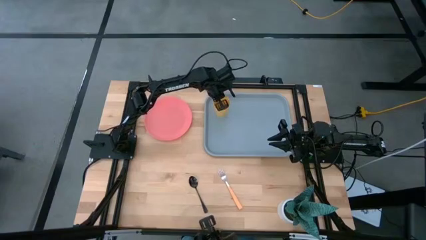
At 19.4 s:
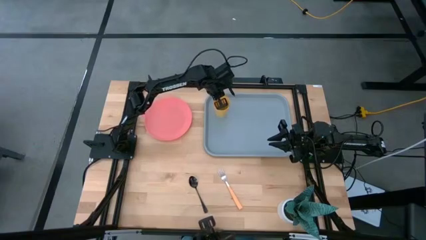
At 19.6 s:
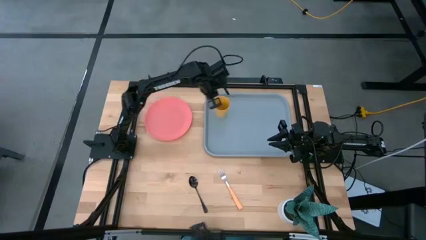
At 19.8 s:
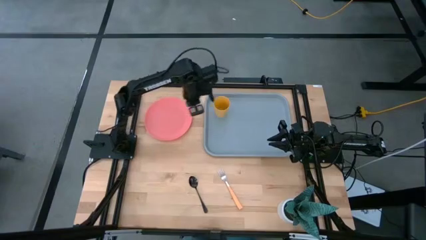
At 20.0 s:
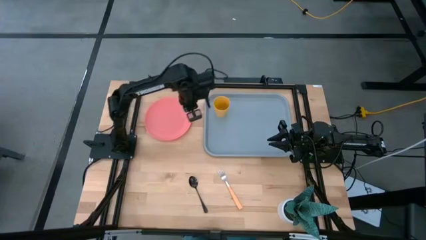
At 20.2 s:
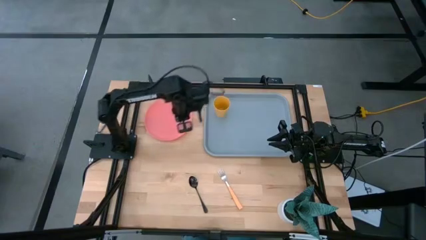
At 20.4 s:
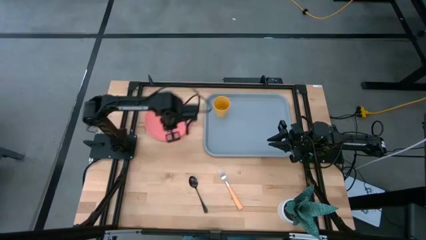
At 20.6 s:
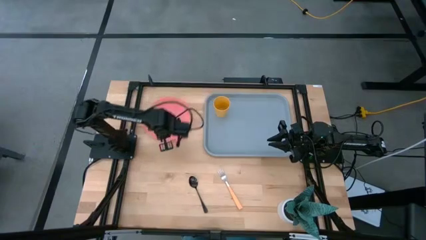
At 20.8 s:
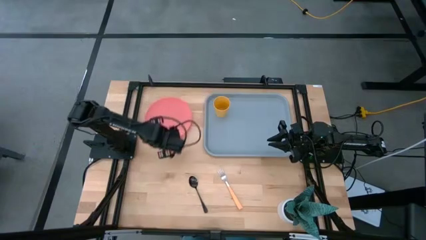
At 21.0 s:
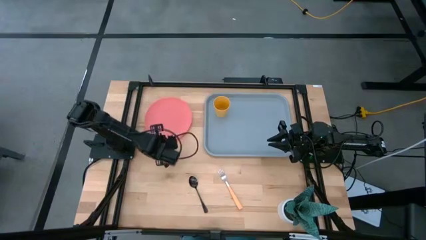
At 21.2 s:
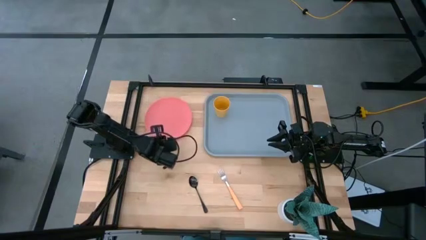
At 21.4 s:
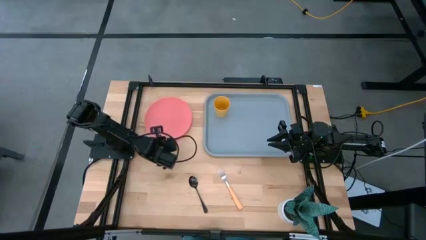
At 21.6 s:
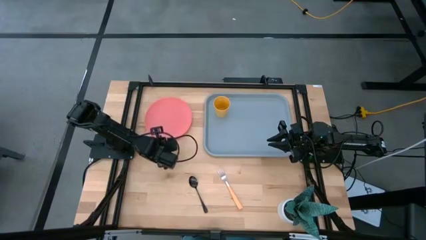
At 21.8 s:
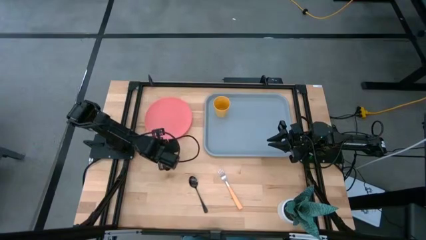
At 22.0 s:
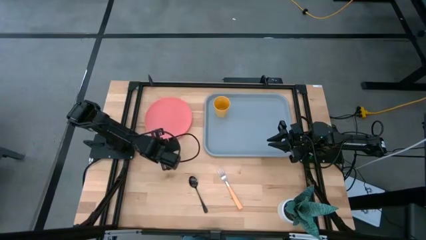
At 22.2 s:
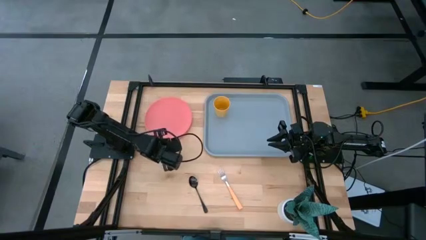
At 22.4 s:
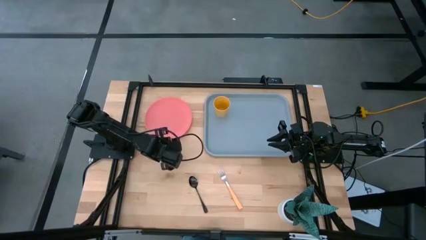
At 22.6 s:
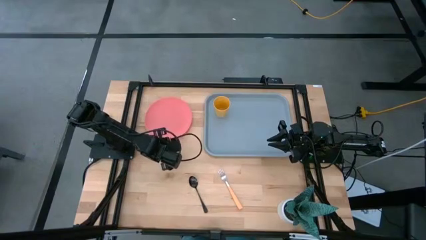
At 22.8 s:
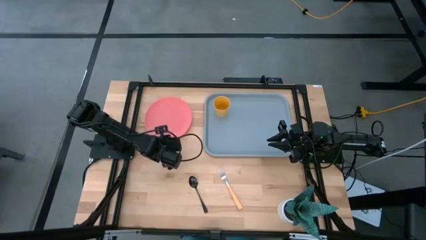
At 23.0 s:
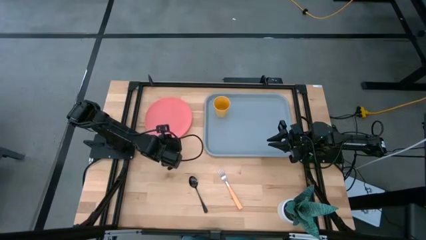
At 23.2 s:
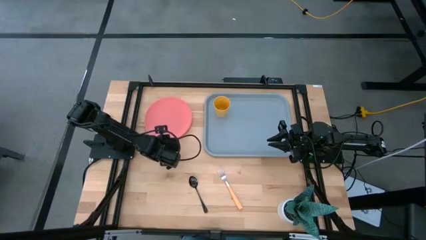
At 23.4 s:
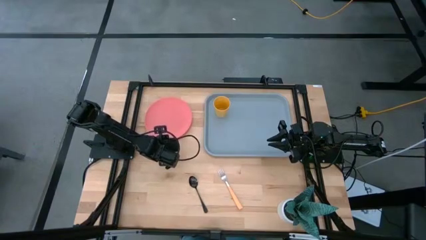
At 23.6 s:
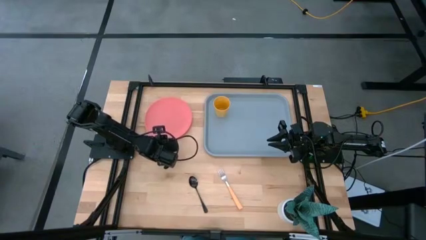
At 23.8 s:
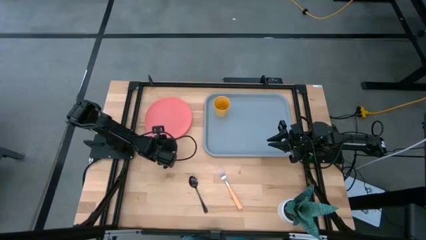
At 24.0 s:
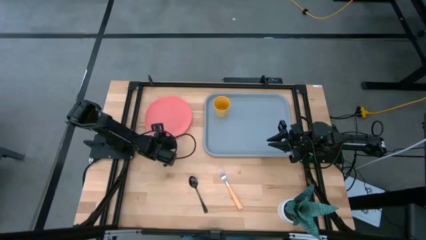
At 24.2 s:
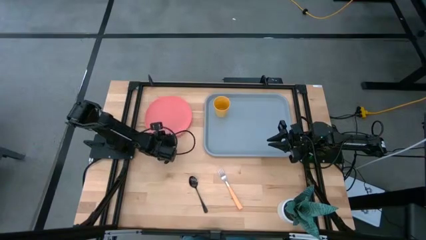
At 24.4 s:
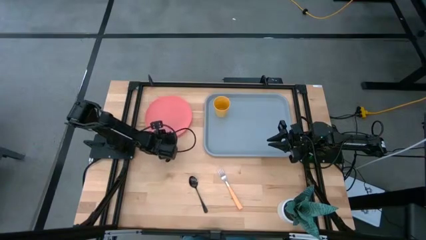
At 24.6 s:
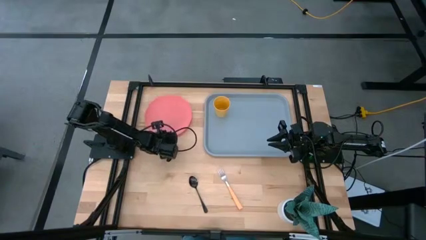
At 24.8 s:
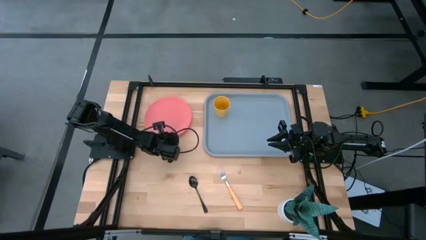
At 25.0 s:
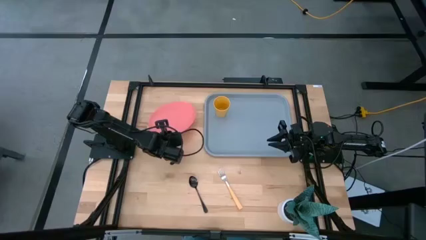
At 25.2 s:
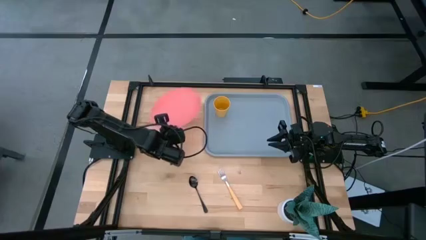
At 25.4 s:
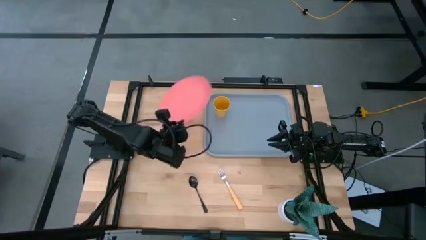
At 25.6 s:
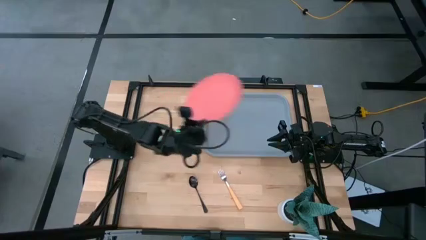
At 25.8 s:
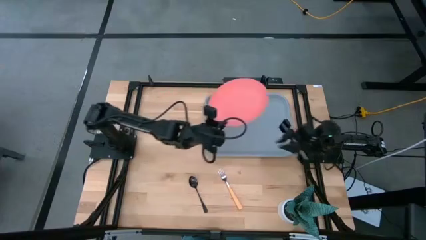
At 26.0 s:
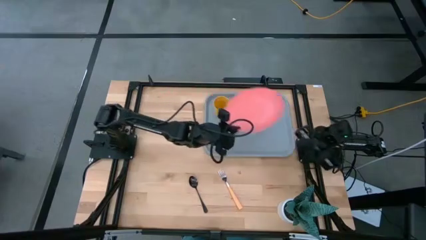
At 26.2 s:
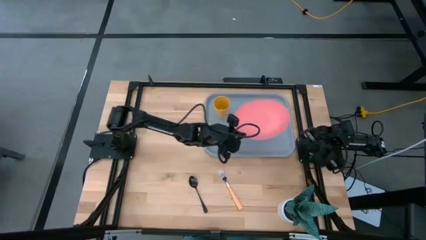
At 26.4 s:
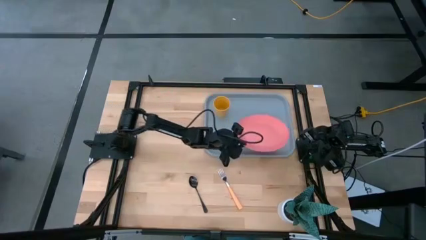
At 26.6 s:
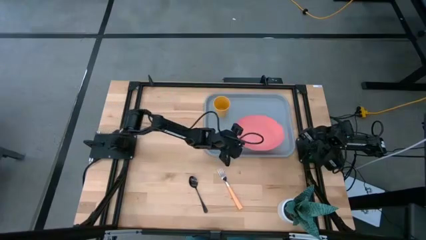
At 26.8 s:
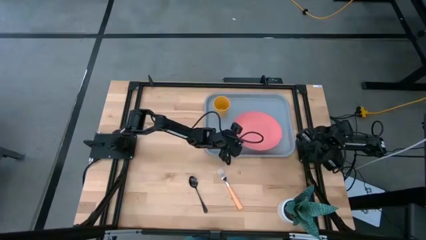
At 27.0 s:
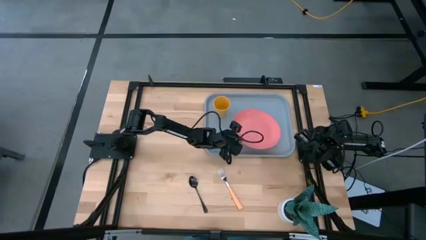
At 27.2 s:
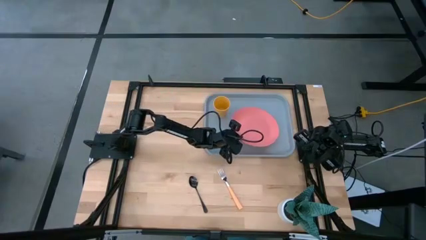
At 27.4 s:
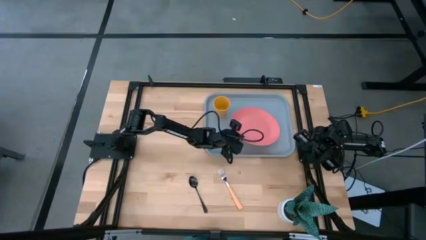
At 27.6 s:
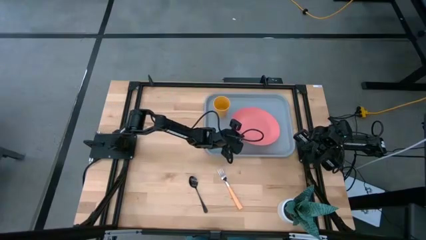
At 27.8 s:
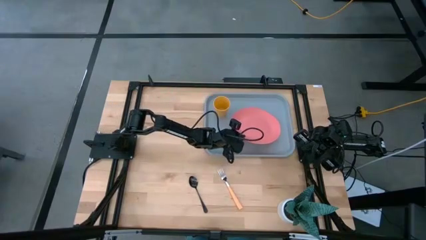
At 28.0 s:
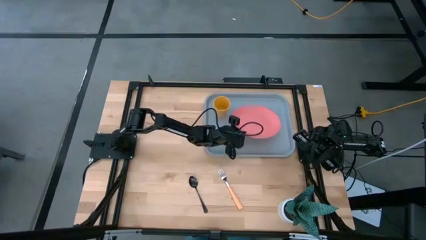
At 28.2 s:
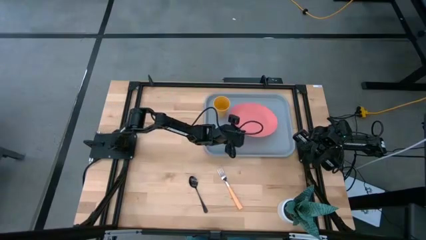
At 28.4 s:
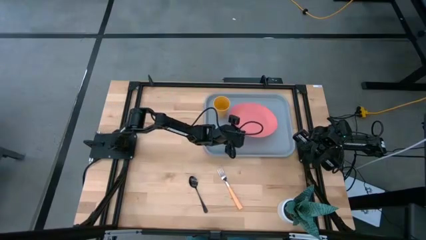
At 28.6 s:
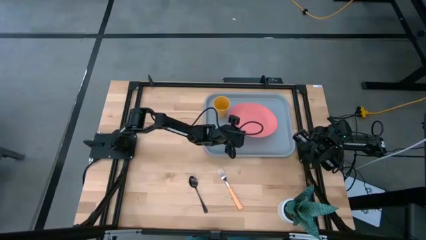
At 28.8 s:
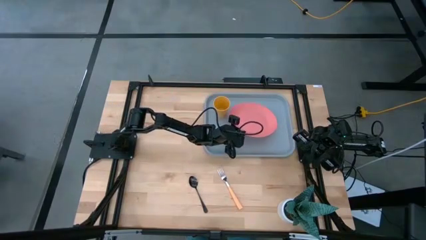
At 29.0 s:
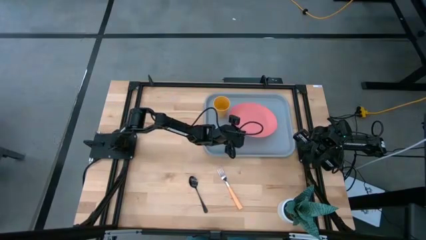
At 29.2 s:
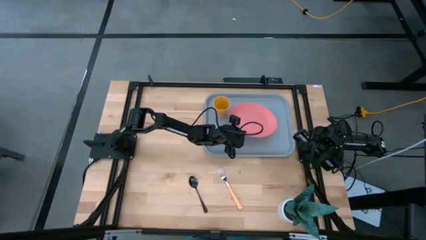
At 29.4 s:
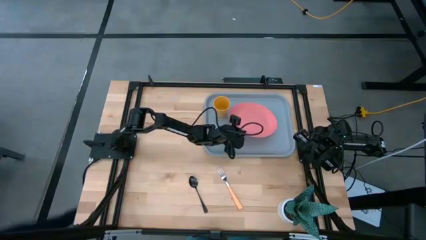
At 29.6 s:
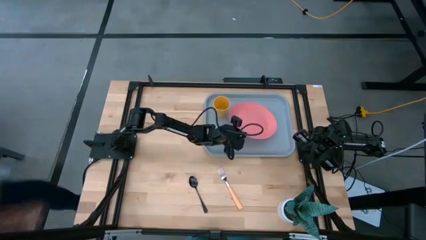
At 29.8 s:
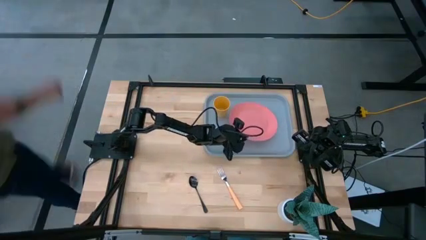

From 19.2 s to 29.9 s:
Task: Pick and place plate/cup/fork/spoon on tray
Put the pink plate on the gray tray to the right of the yellow cup

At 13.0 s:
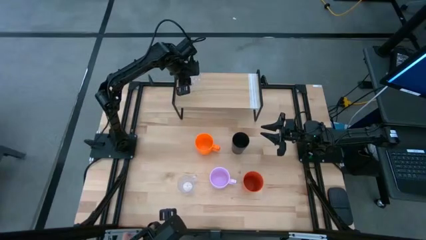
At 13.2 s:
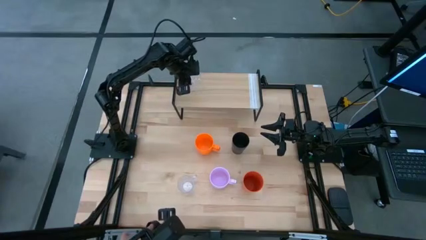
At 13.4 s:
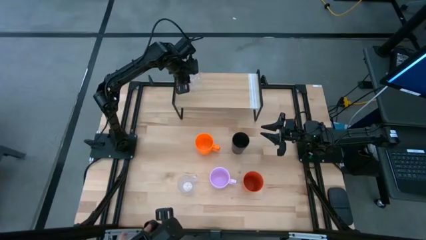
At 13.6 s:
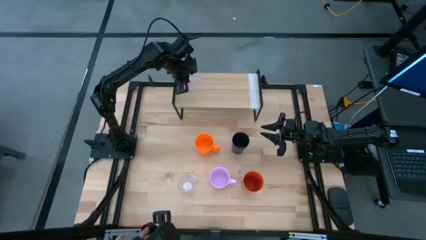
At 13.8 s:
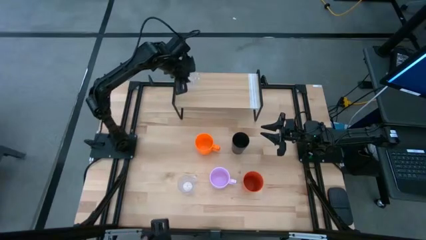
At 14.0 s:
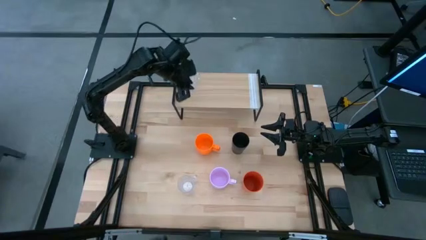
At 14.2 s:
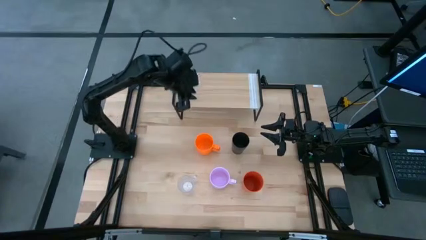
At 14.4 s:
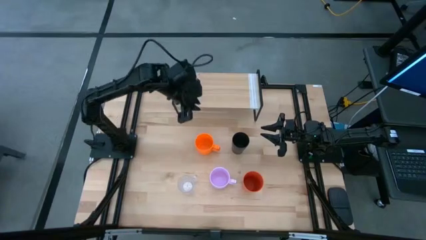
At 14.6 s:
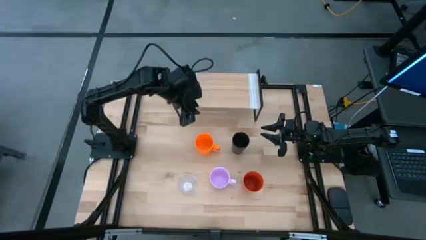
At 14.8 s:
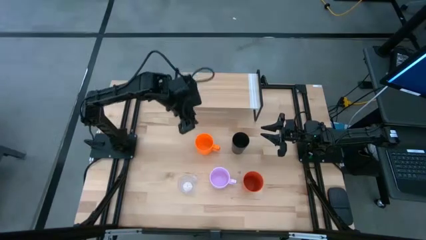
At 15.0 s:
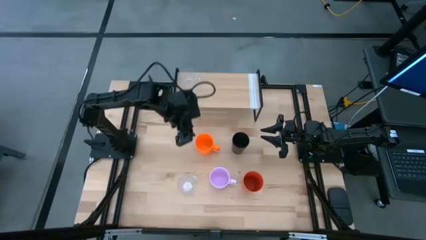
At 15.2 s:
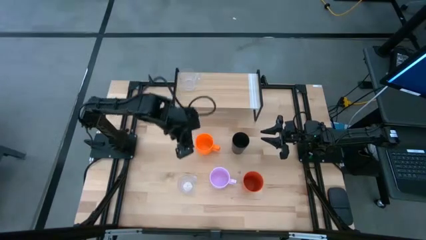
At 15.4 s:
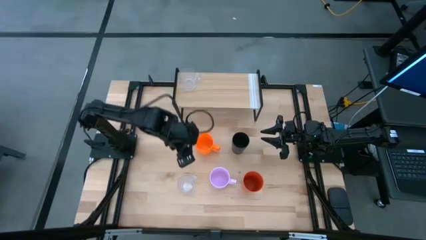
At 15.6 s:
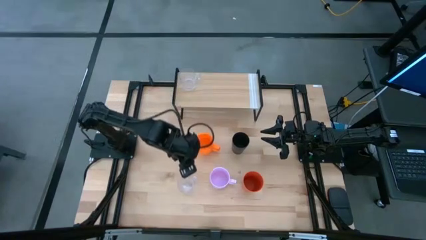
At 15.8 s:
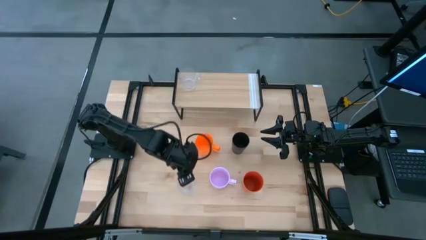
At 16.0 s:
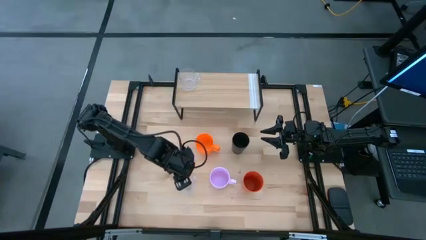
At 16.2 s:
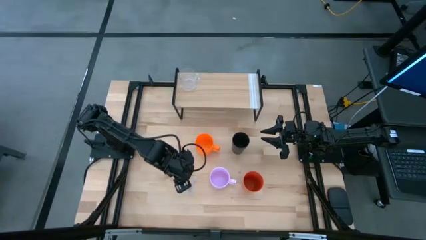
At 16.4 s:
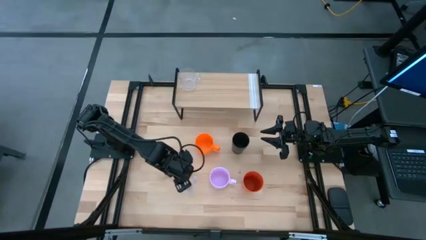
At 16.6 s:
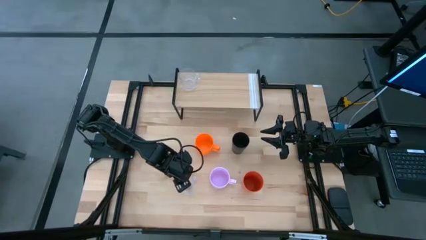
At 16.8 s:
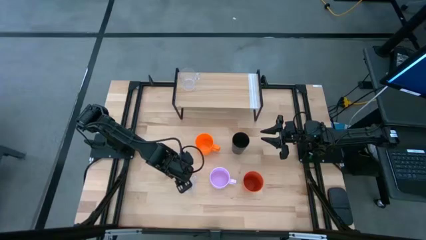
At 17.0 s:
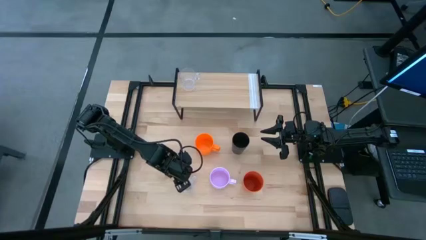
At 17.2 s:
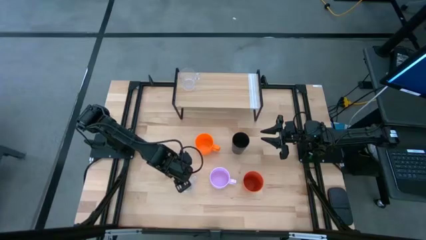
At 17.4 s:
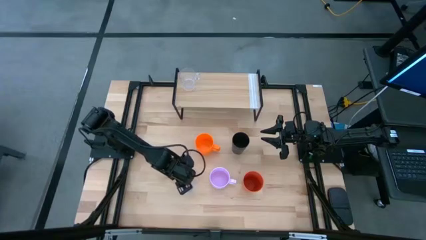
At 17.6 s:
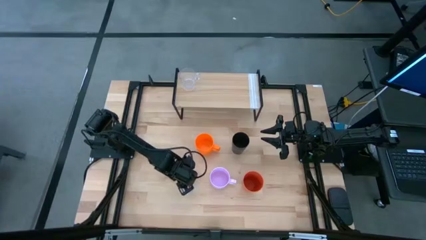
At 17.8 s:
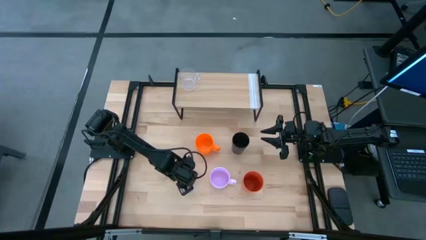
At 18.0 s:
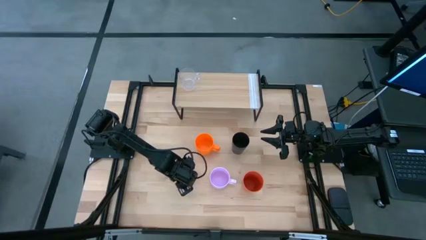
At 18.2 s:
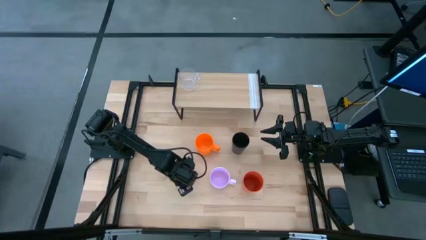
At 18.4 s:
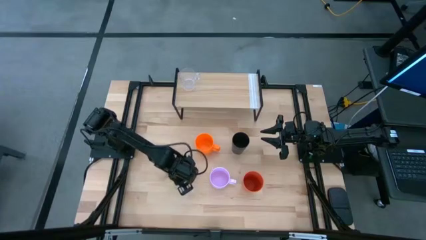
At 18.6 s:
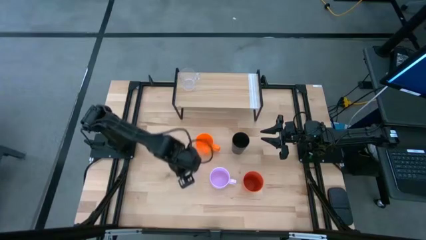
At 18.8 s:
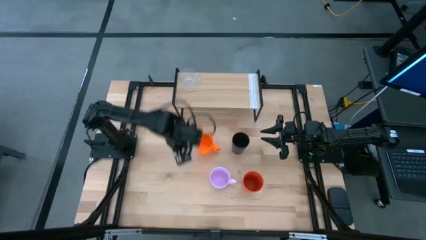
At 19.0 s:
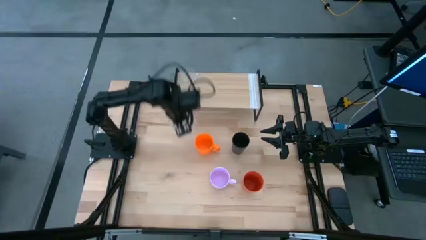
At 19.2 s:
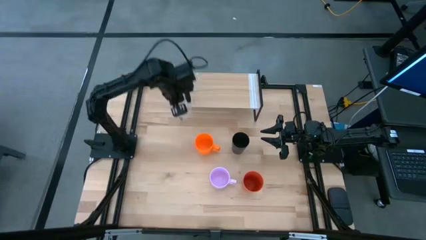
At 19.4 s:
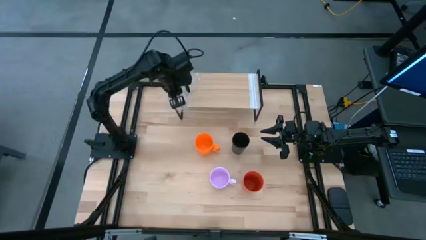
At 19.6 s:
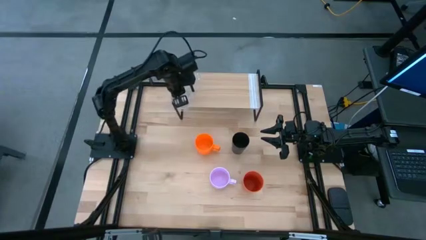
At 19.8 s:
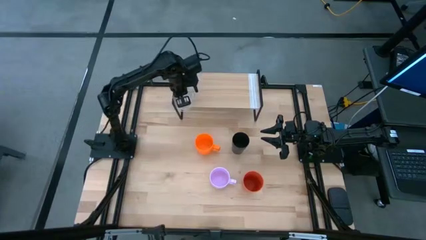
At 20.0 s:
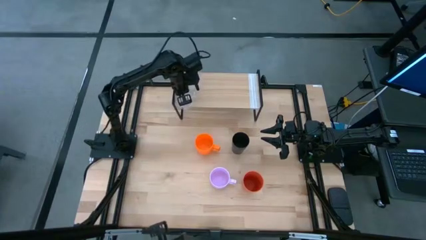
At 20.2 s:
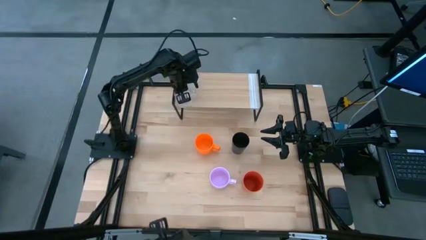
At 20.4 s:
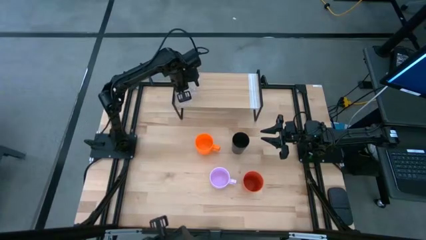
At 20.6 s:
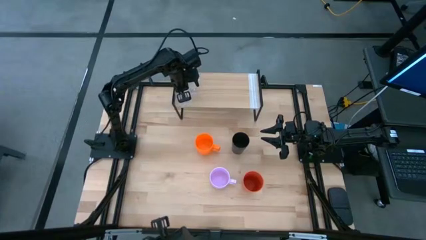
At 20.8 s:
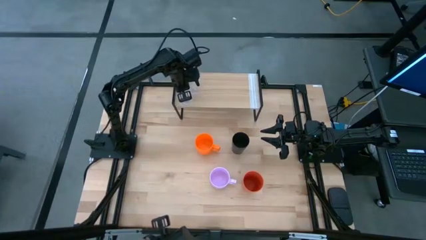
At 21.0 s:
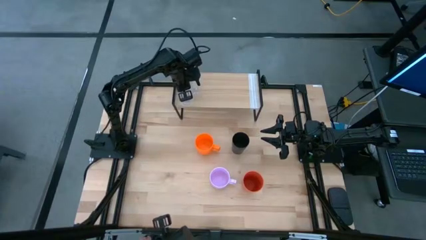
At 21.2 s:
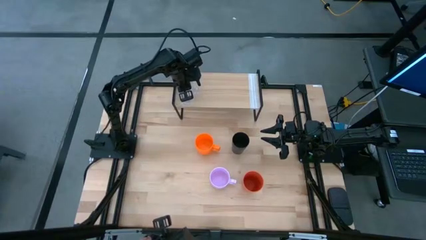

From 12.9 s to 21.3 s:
Task: Stack small to large cups/mugs on shelf
Put the transparent mug on top of the shelf
